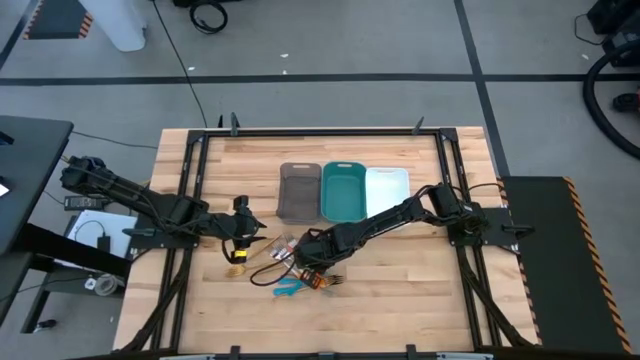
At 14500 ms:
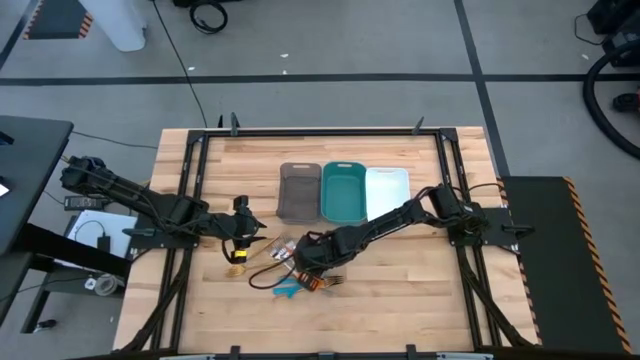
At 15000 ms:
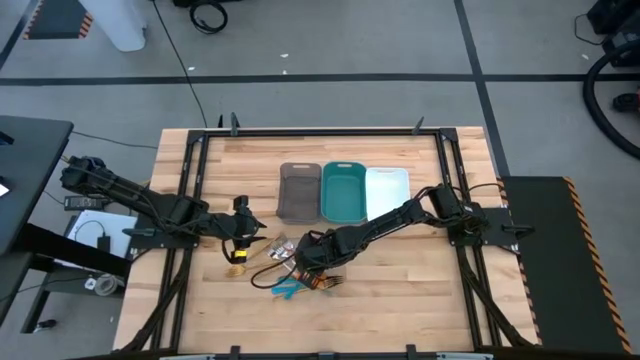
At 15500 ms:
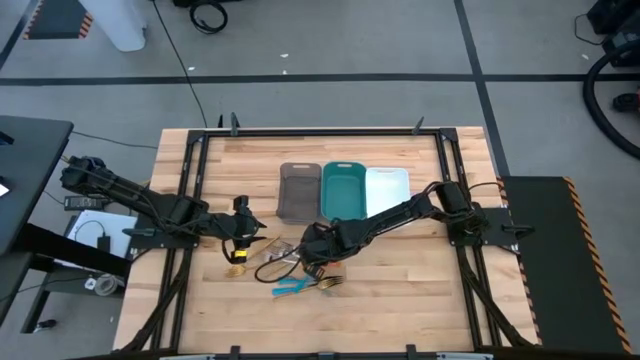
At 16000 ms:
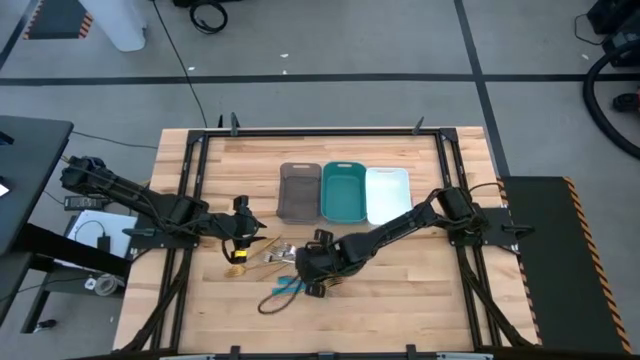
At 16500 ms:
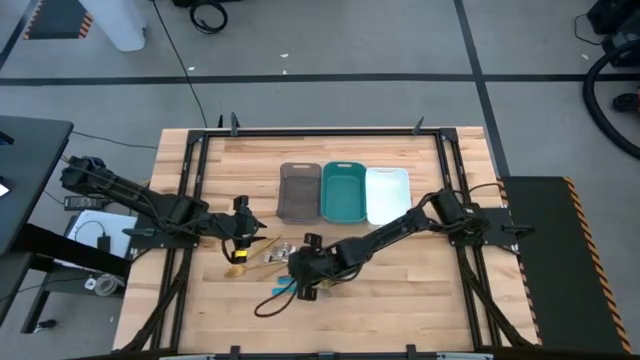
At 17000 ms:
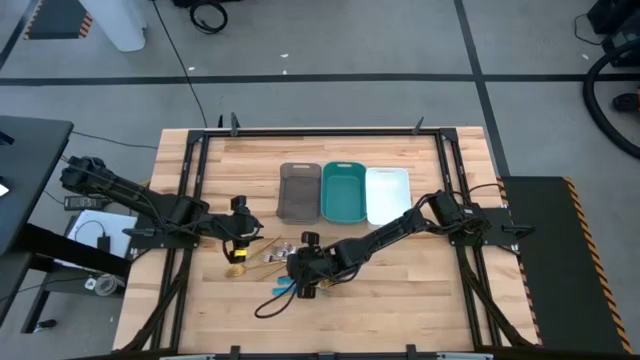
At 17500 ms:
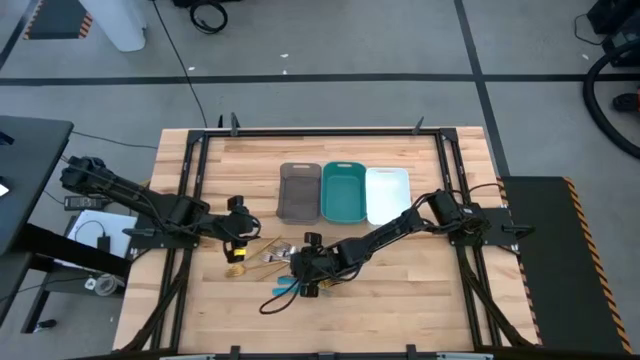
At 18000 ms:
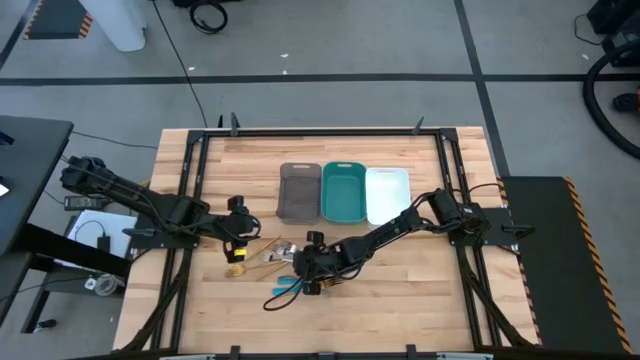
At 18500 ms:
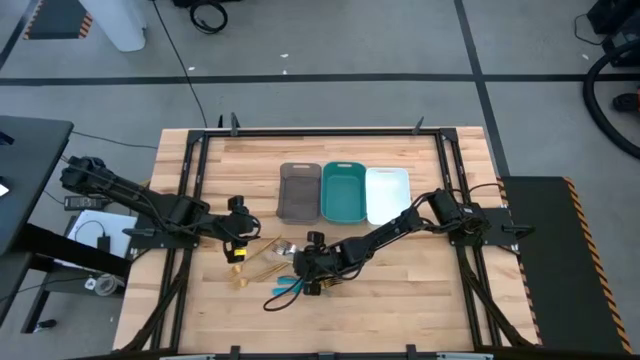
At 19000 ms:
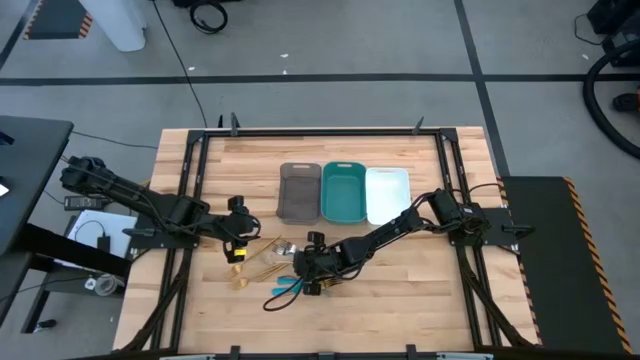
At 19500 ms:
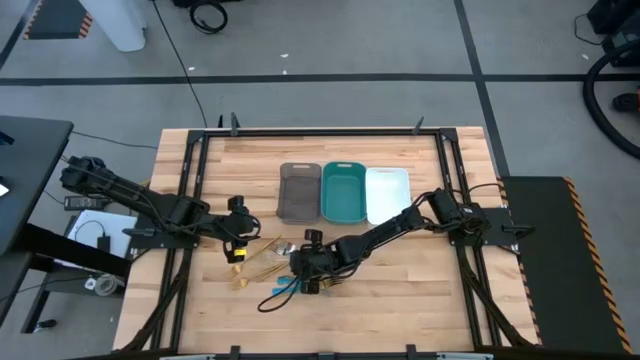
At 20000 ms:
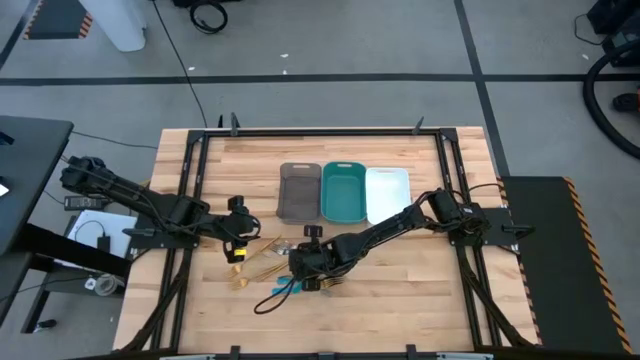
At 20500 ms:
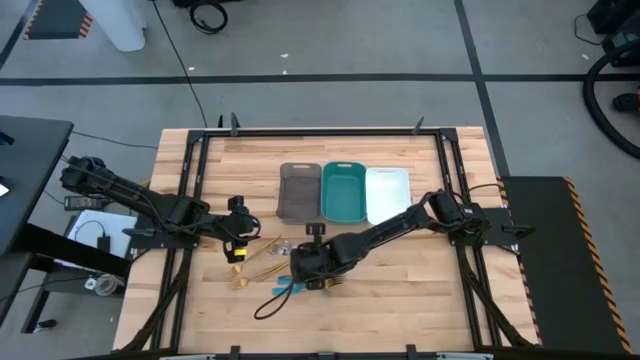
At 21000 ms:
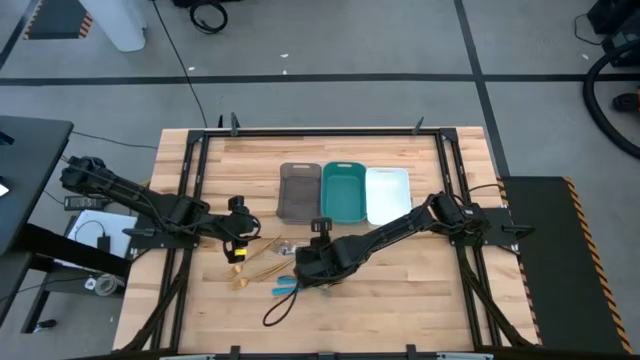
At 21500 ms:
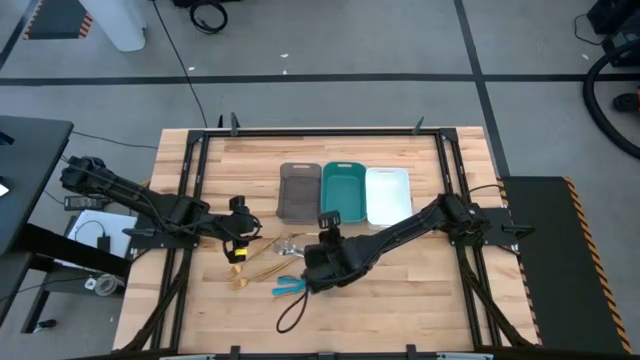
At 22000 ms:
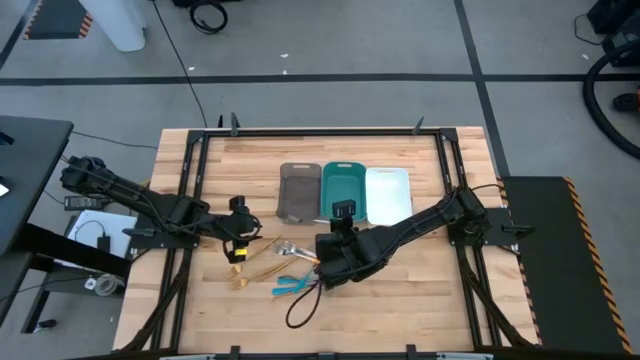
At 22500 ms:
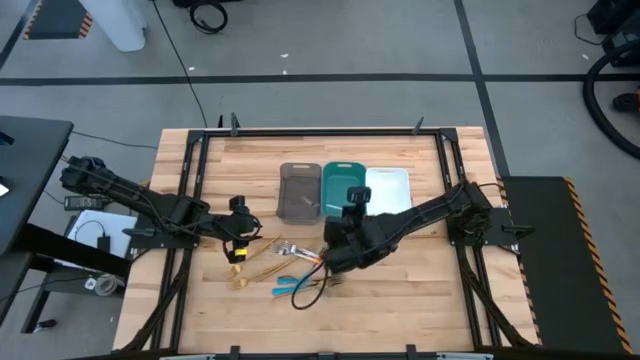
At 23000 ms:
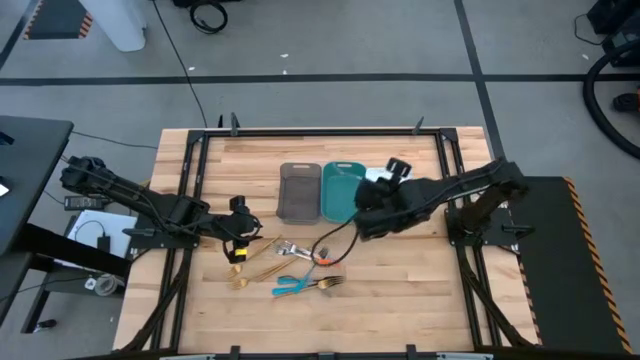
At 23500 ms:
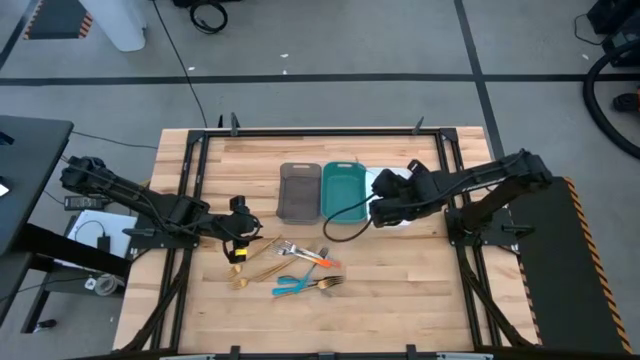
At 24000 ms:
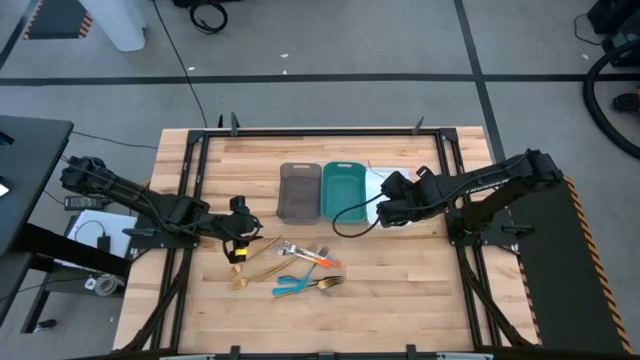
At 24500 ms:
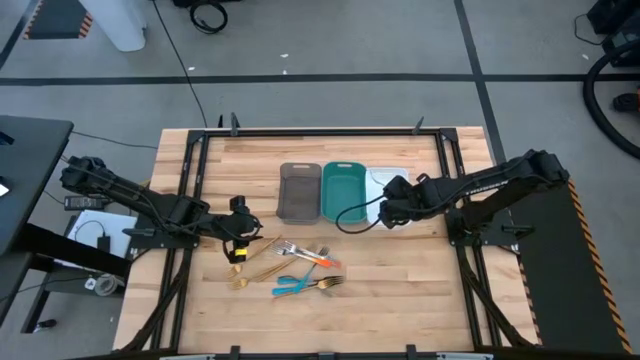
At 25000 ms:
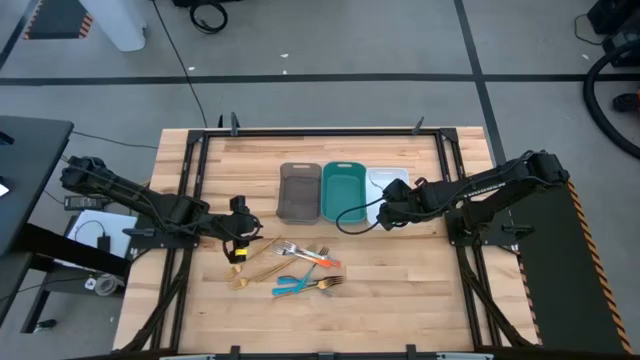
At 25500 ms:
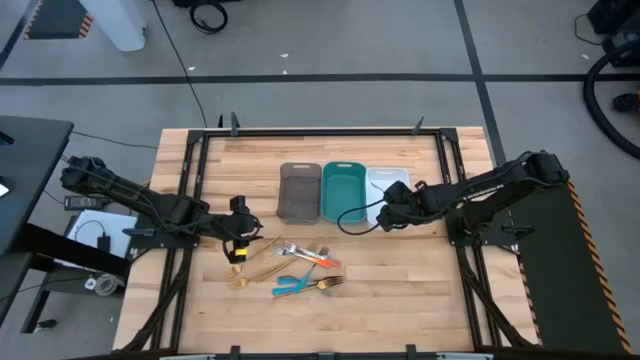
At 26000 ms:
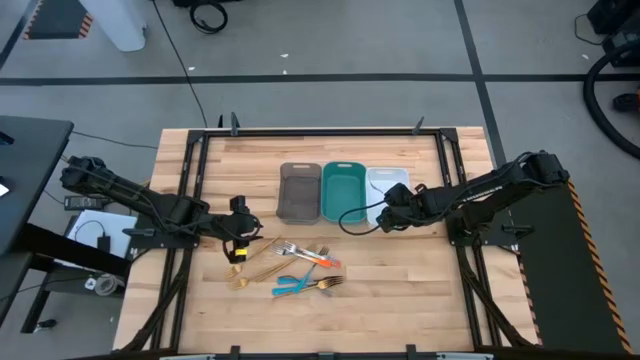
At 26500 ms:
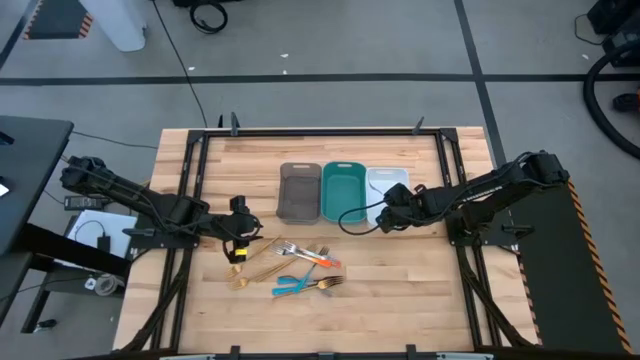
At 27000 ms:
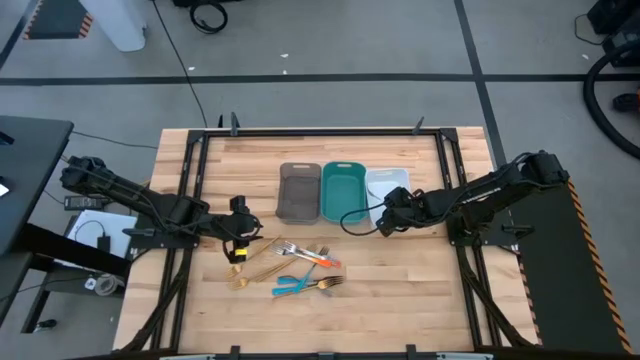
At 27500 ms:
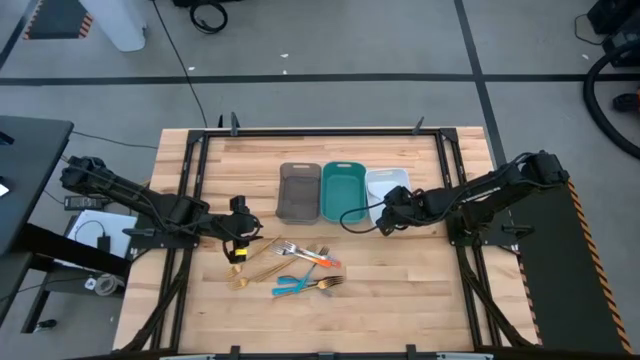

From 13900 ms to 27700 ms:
Task: Sort silverware by color (type)
Put the orange fork into the white bin

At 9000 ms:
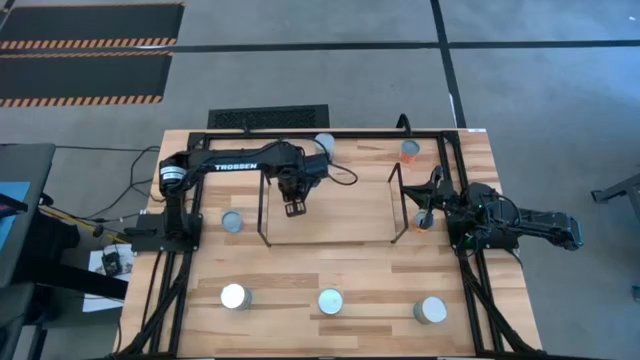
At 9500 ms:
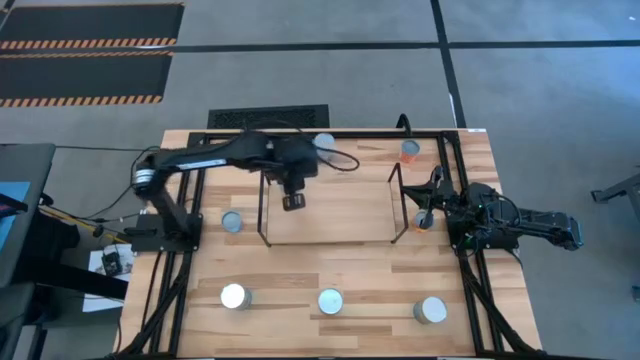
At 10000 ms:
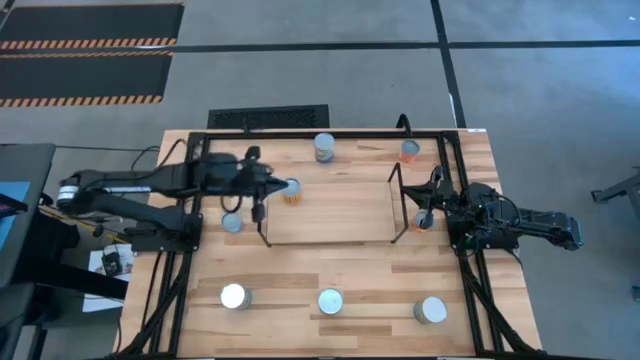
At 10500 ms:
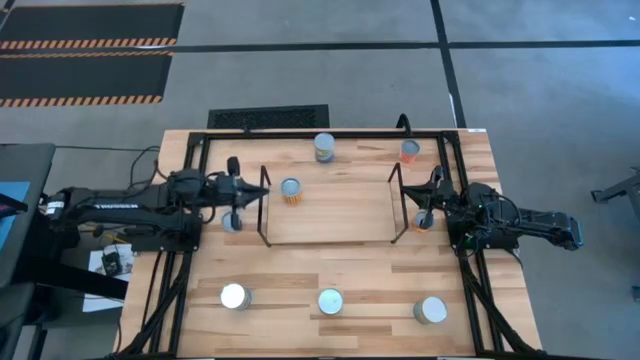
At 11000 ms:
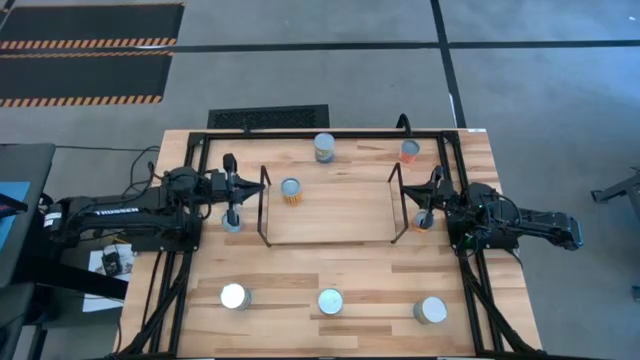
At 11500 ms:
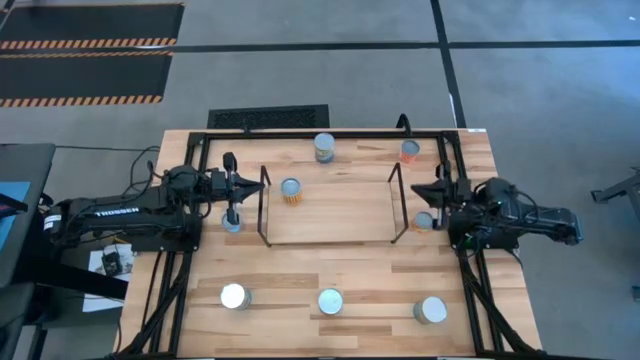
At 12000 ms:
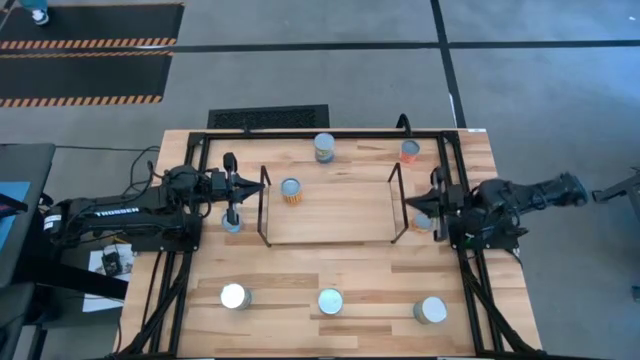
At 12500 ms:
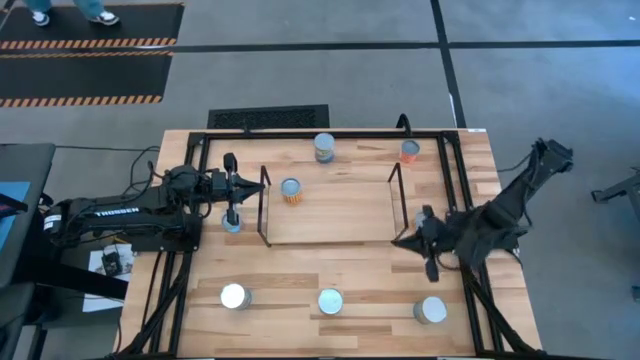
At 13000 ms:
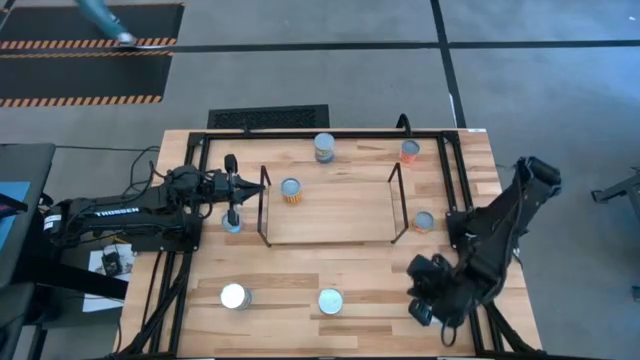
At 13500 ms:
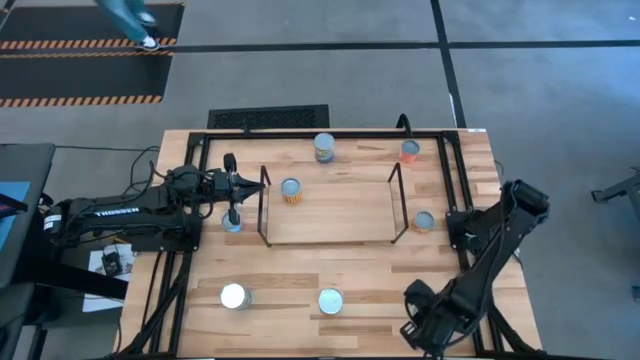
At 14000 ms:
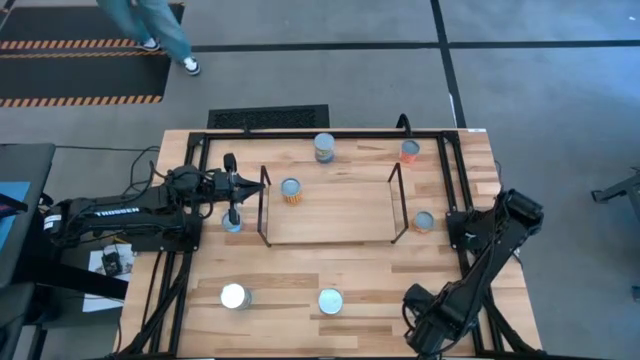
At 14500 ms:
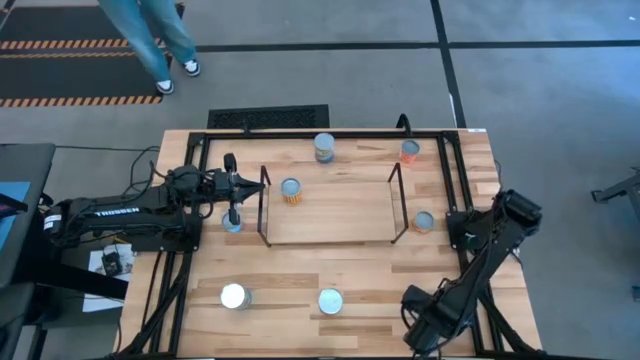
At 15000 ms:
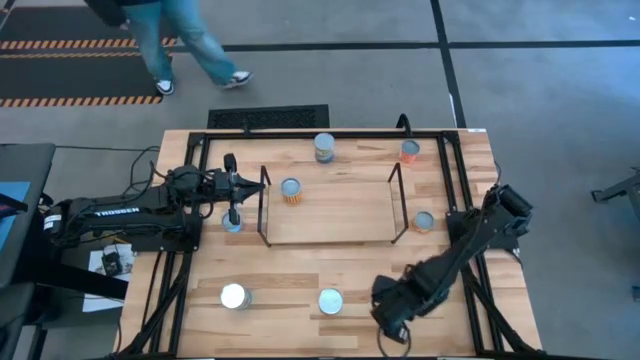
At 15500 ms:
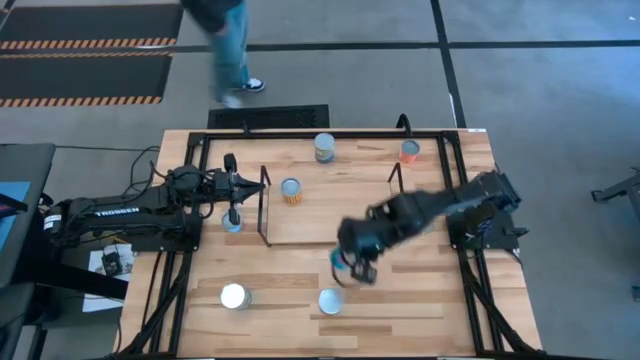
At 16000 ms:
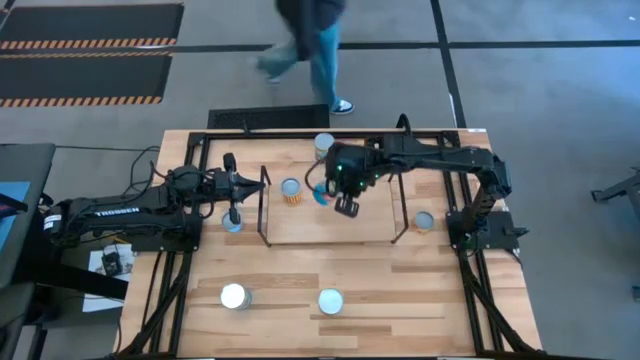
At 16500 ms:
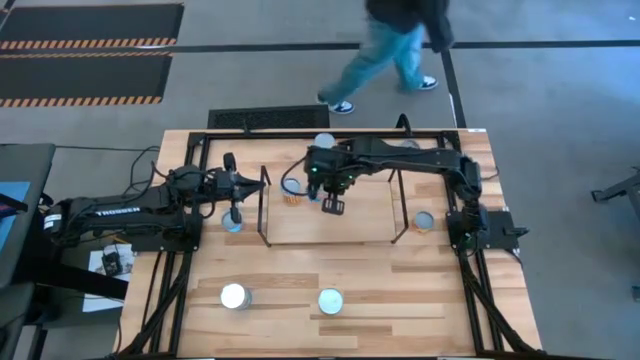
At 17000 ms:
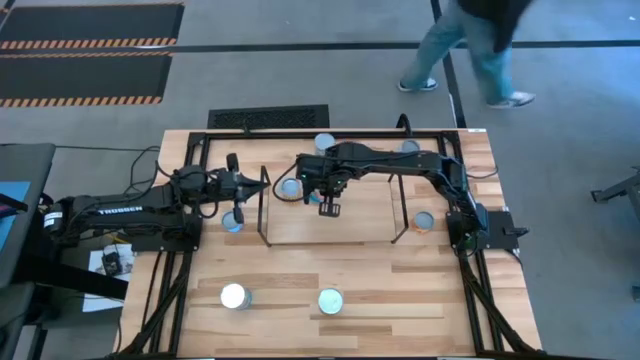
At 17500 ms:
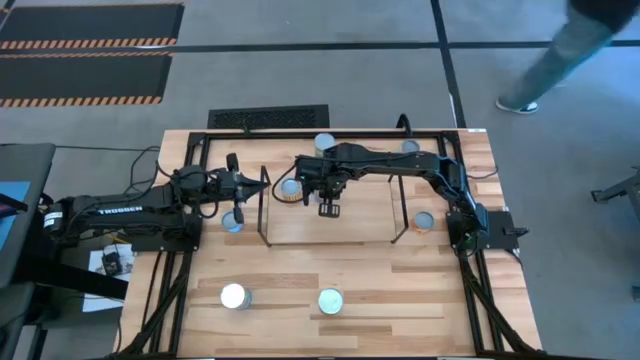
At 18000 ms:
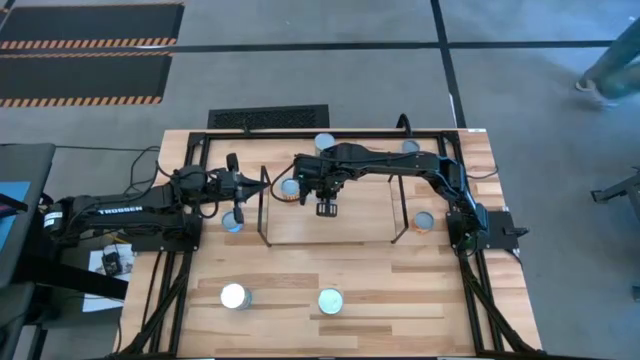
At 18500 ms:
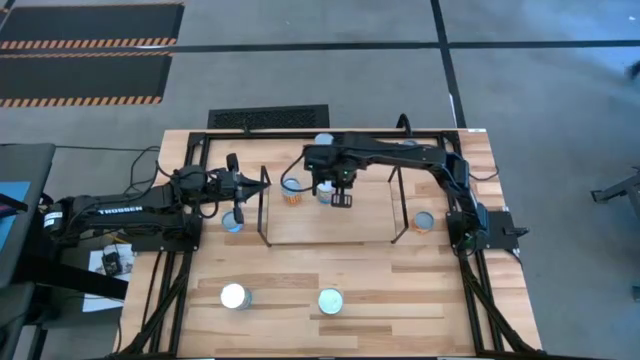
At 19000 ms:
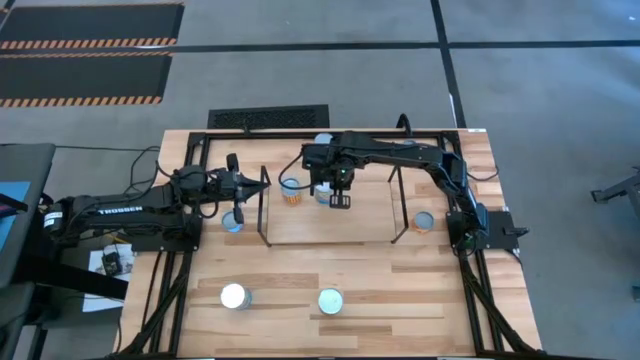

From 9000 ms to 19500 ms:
Task: Pick and place cans onto a shelf
Put the tomatoes can on the shelf
